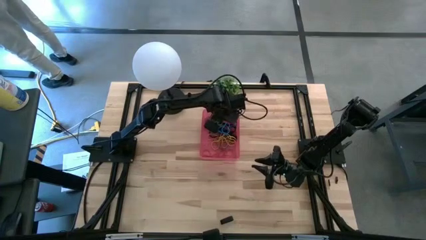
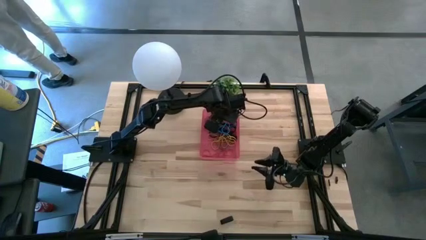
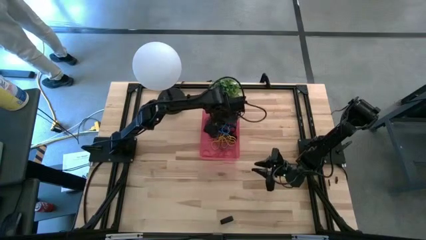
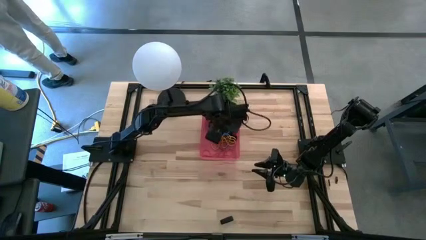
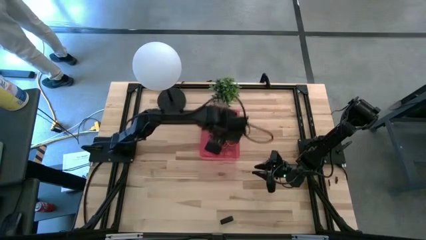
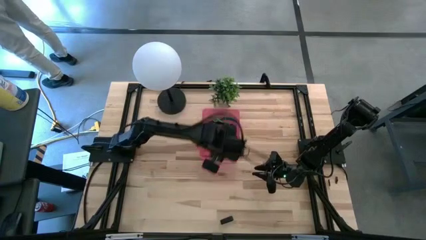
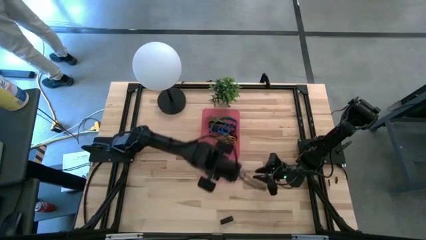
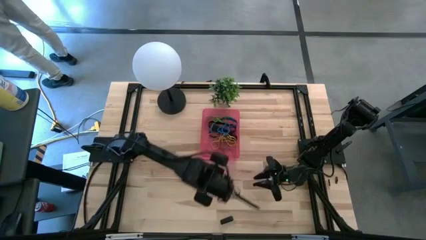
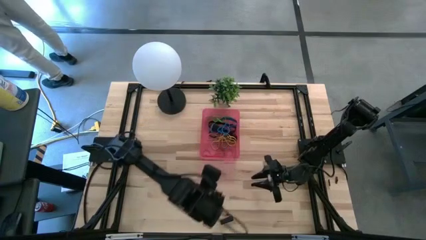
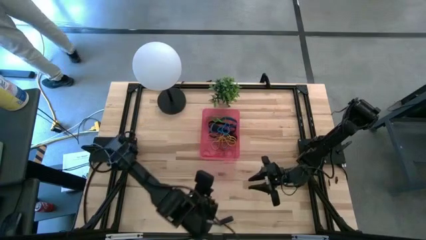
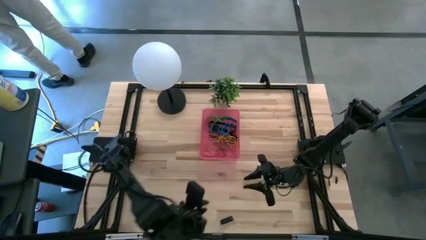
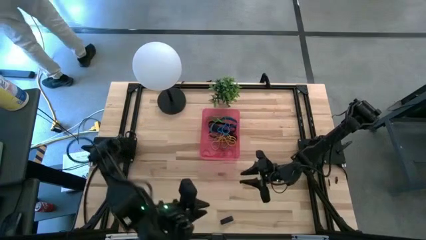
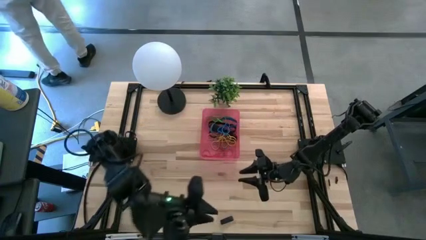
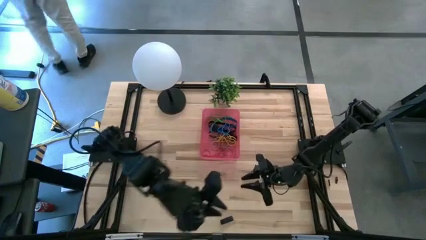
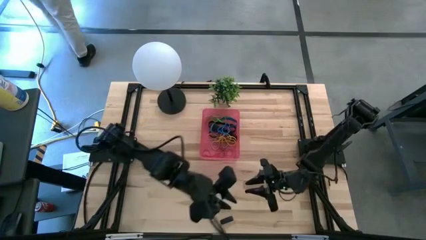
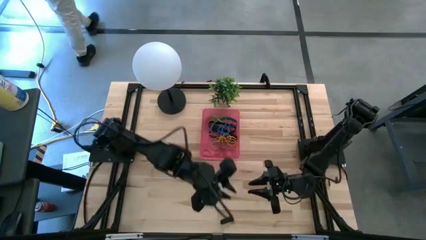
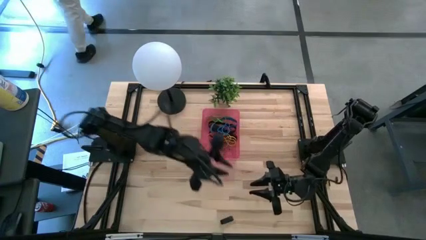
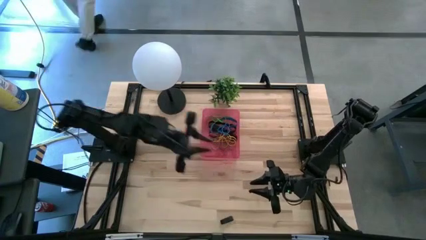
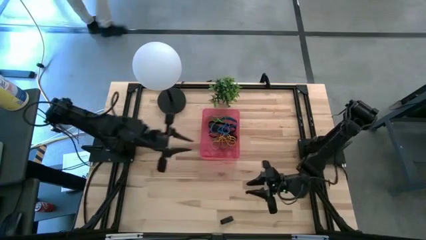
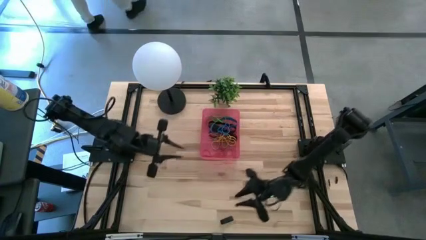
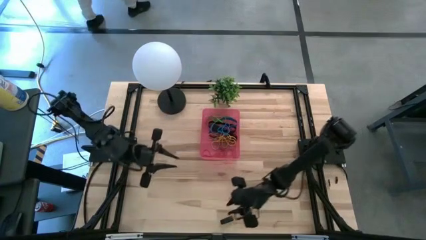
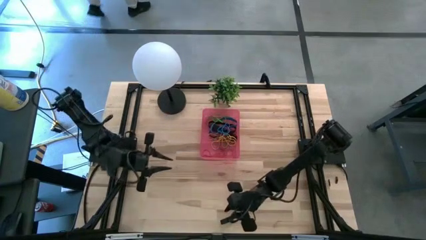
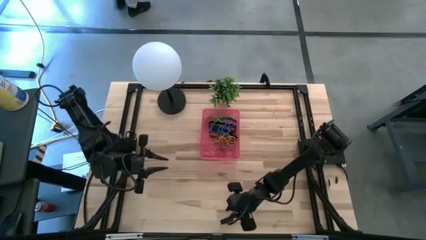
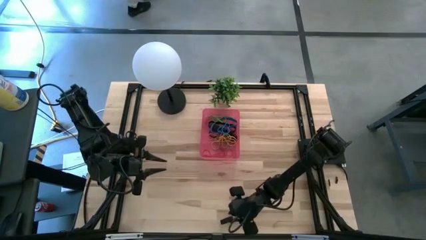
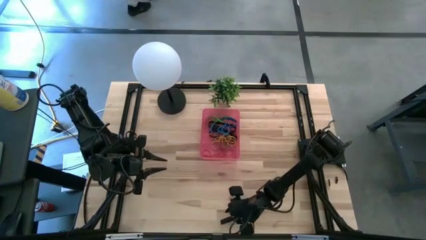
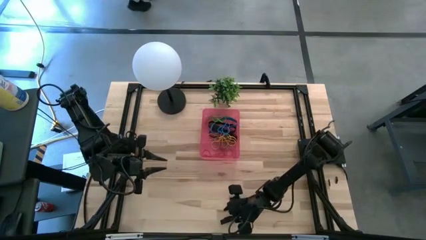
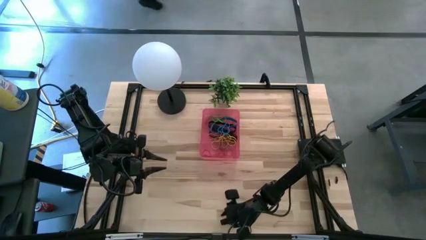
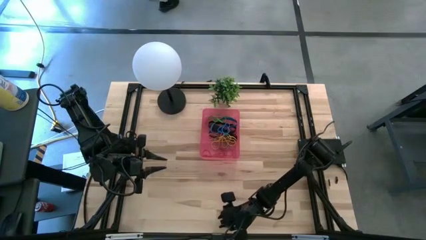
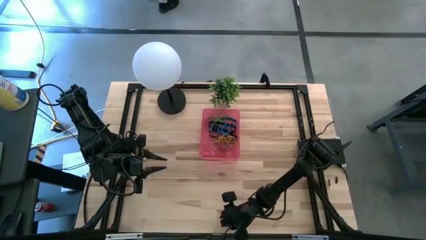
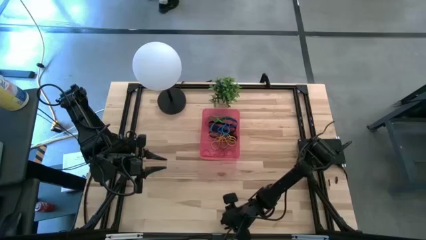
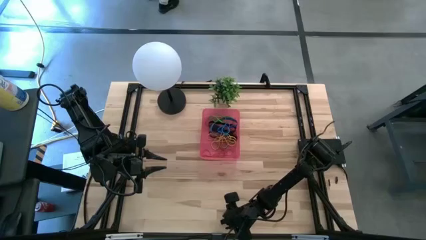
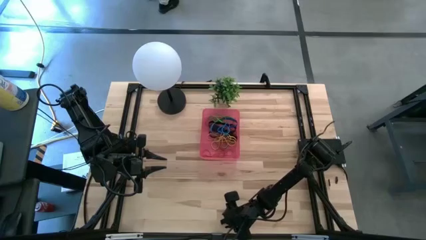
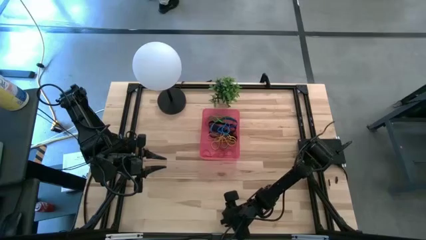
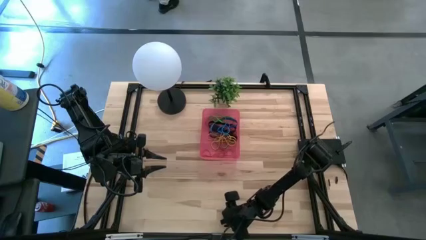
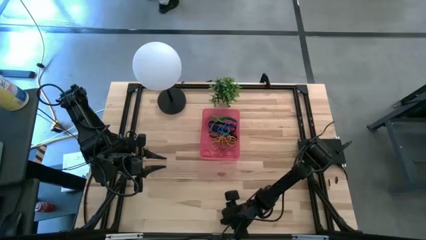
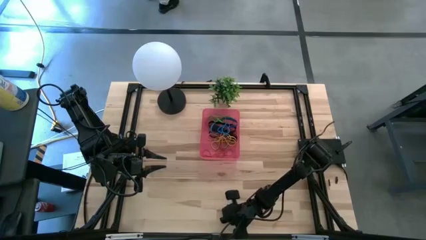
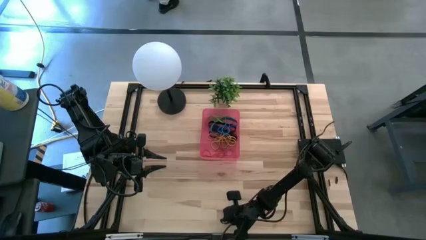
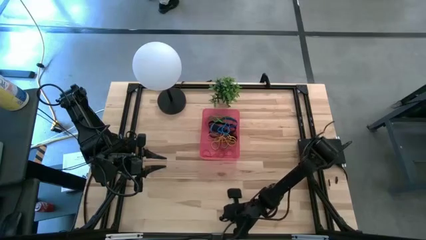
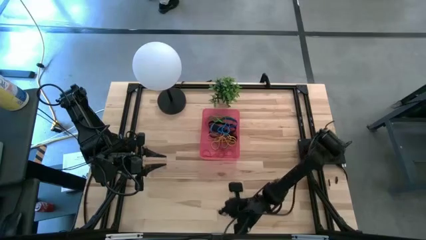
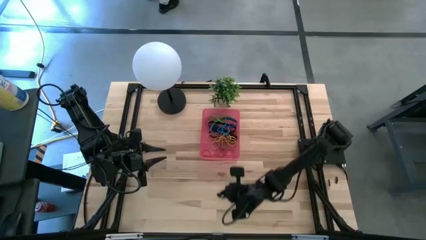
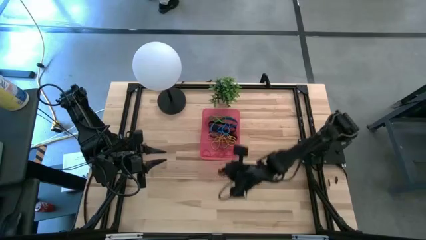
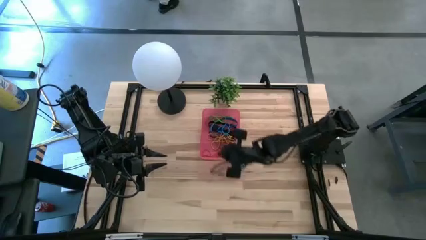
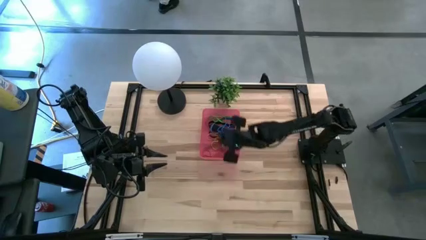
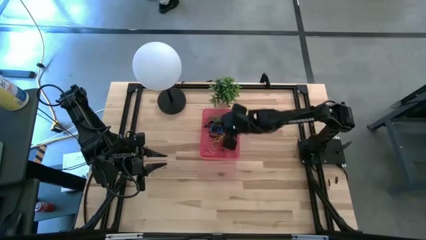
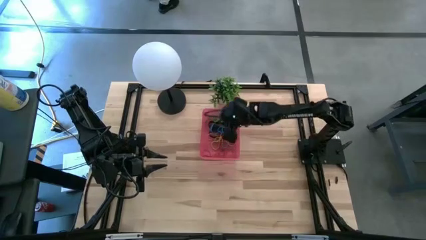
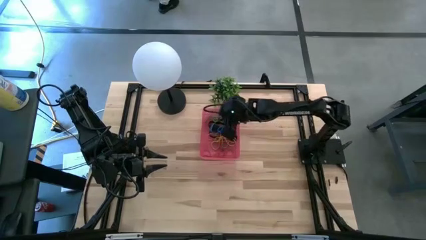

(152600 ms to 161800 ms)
Task: Pick and place rubber bands into bin
Put the black rubber band into the red bin

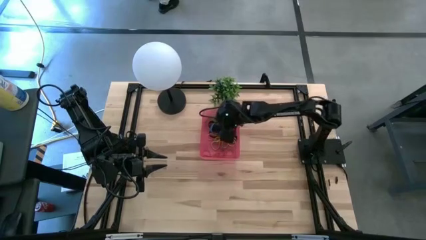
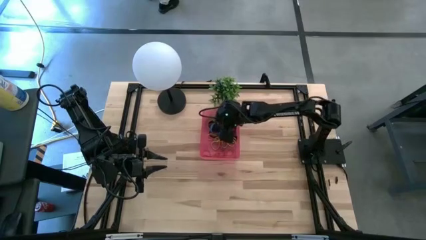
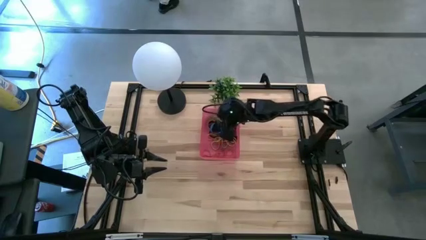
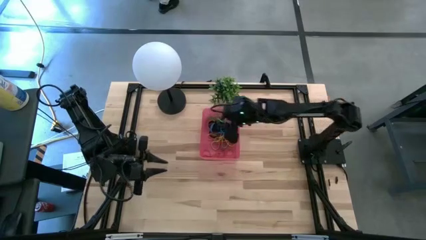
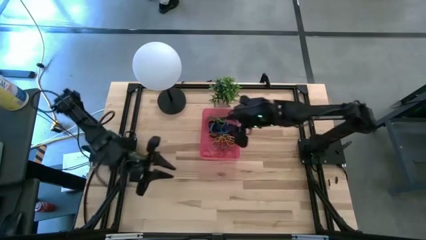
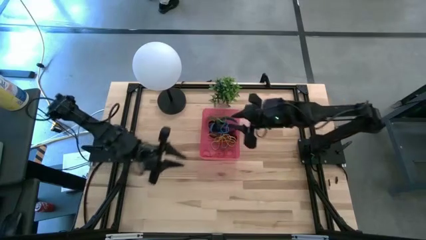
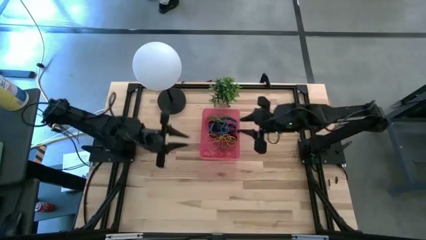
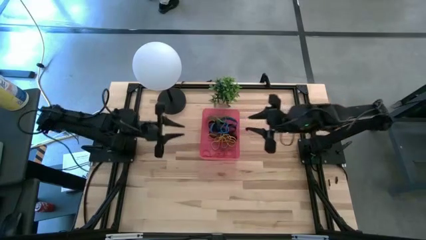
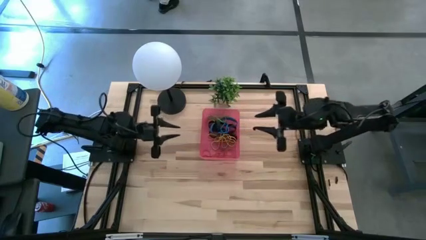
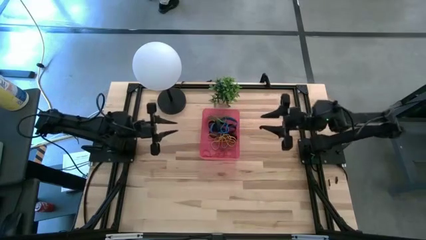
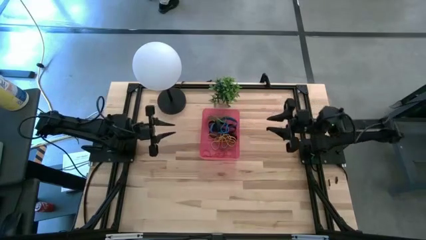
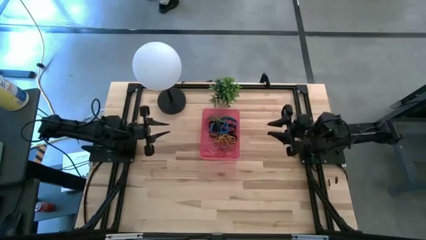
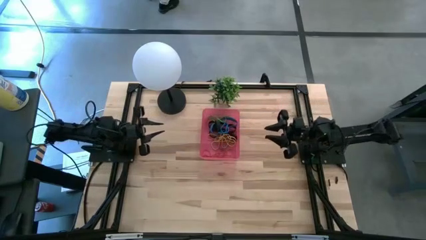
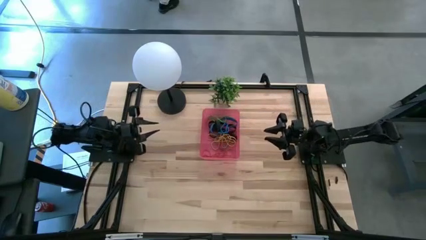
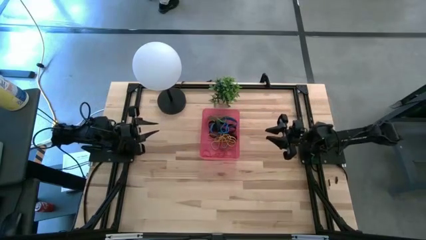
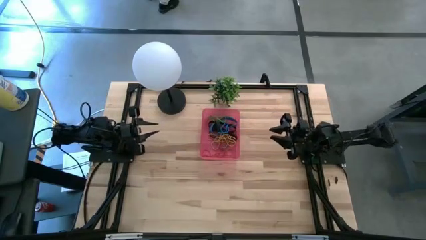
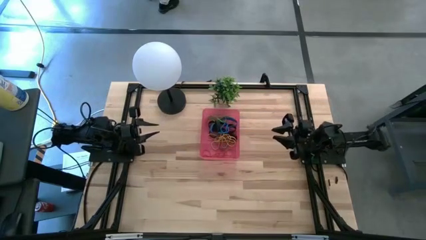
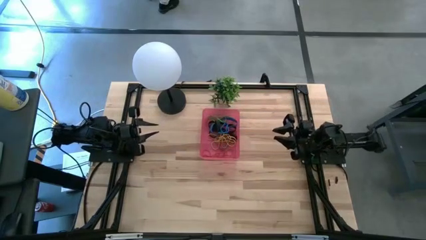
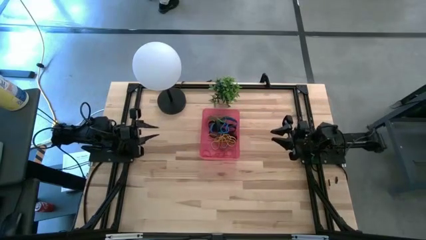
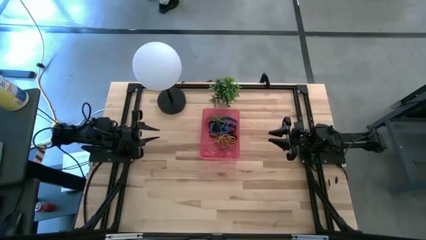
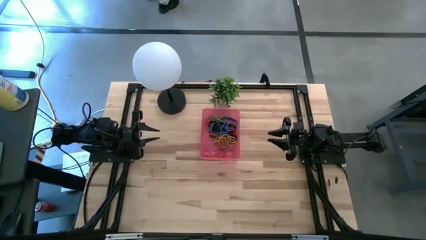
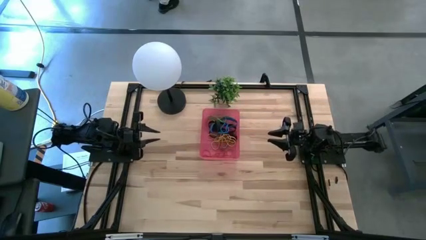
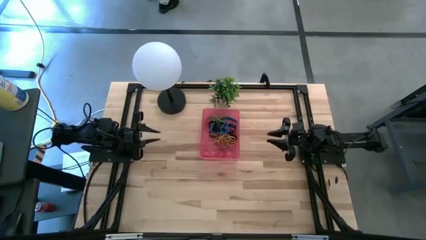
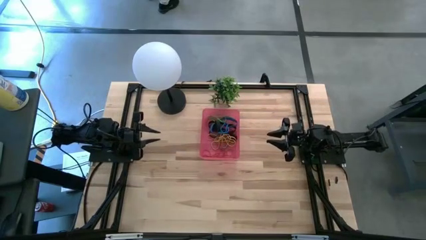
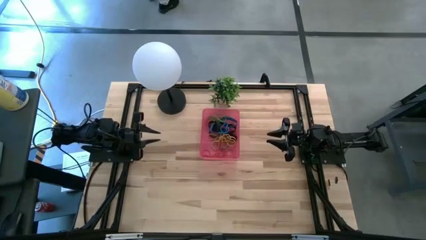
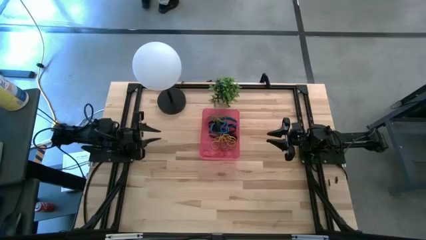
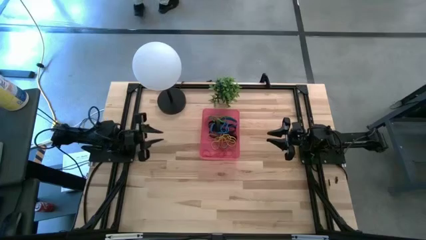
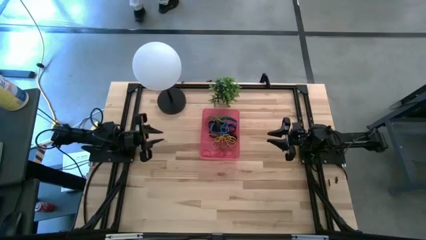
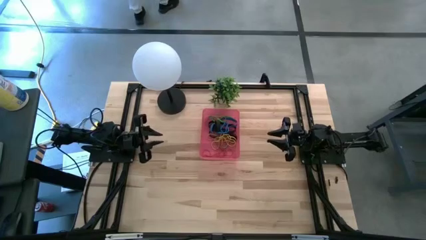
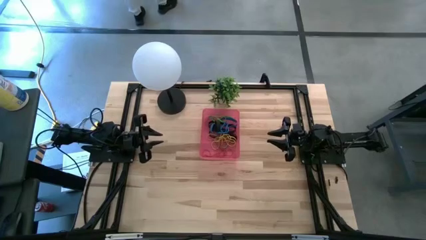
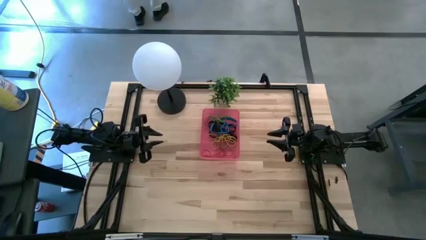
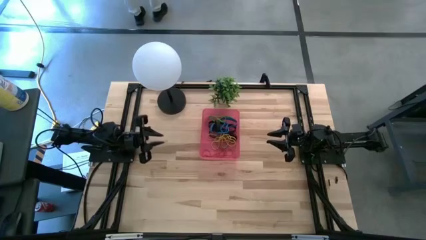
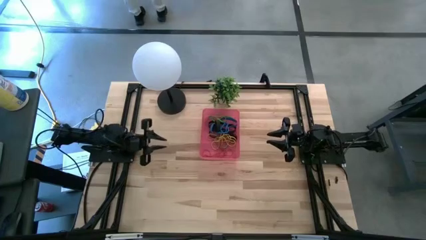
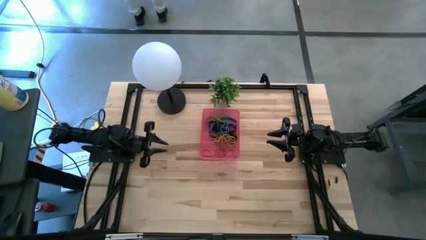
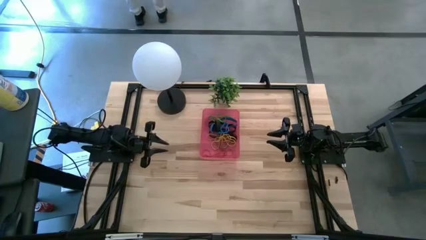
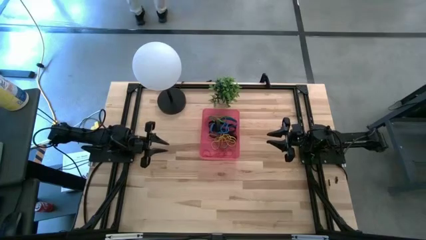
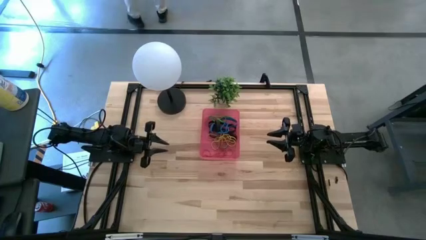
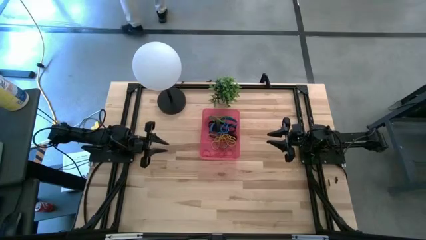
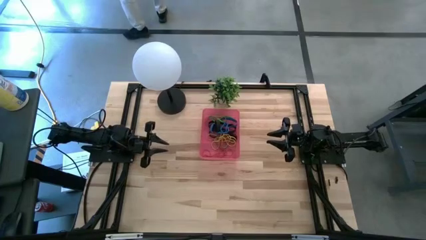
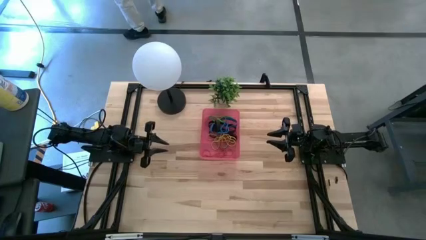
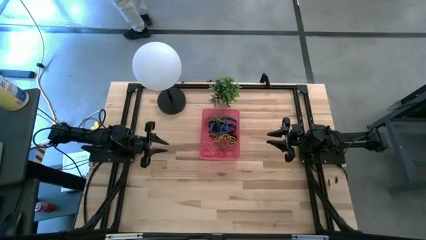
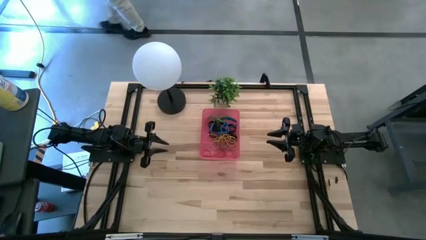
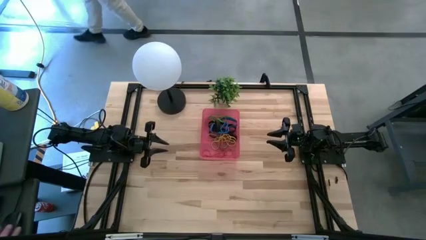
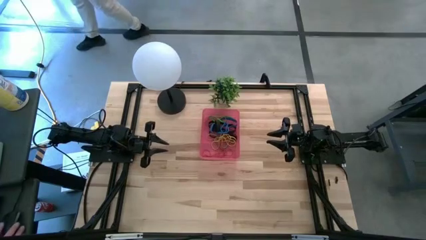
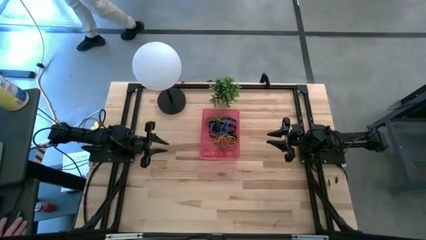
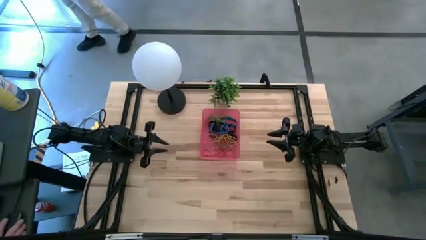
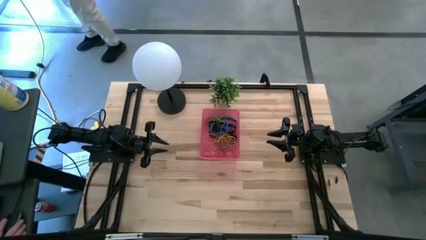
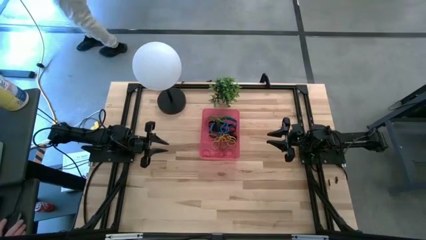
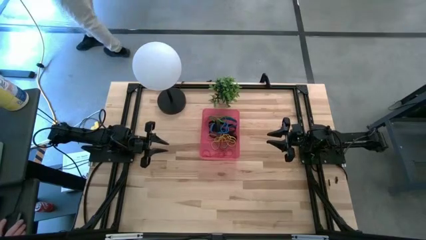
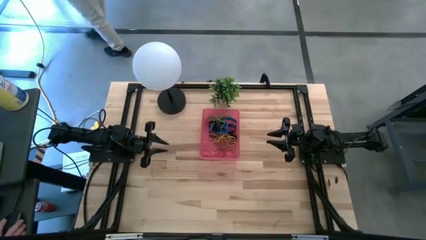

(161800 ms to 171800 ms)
Return to Home Position
